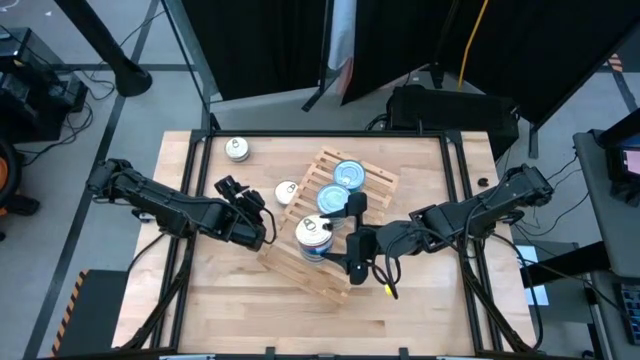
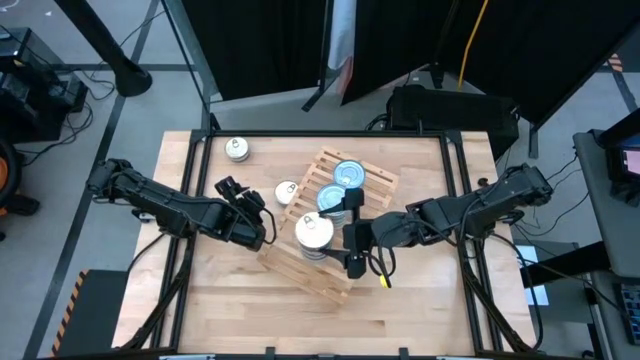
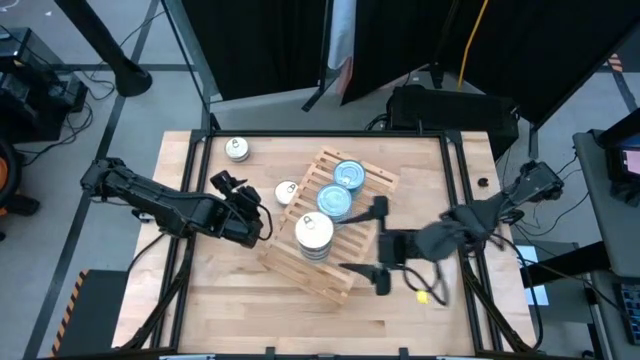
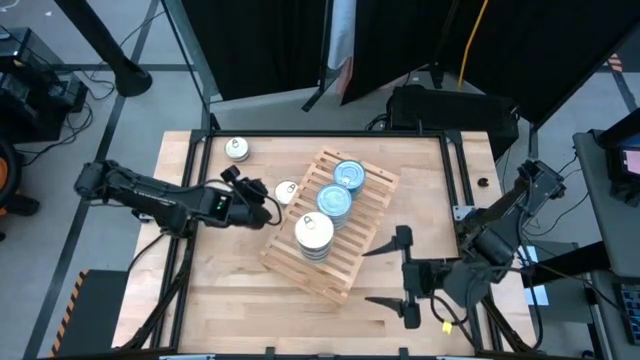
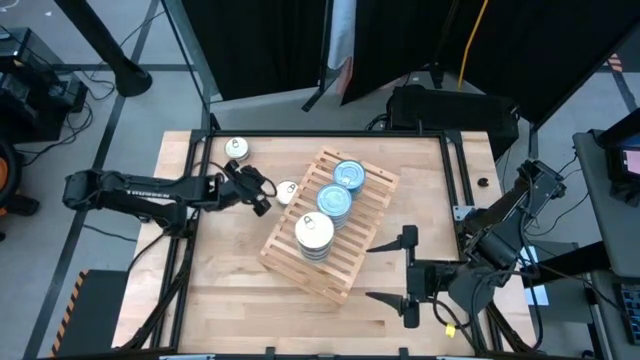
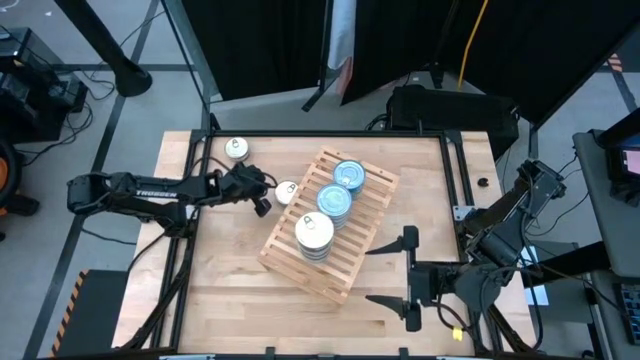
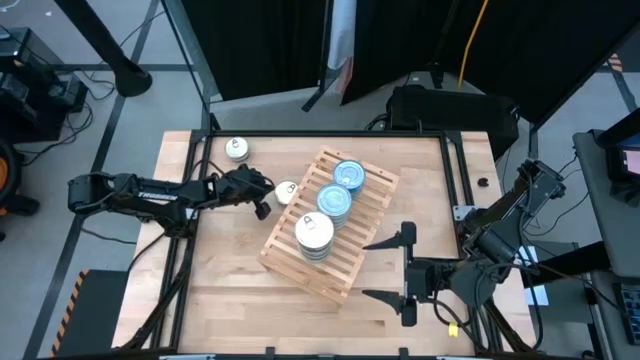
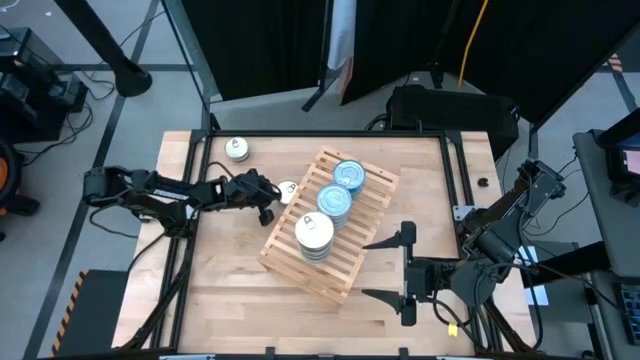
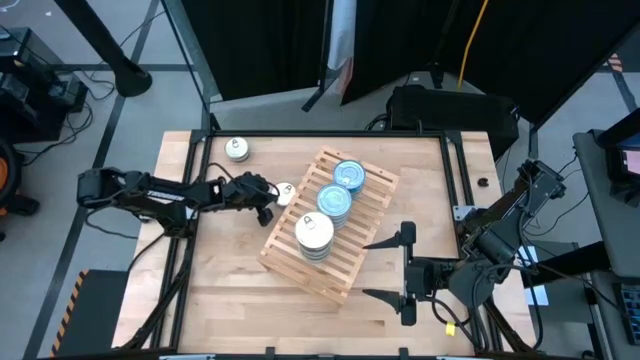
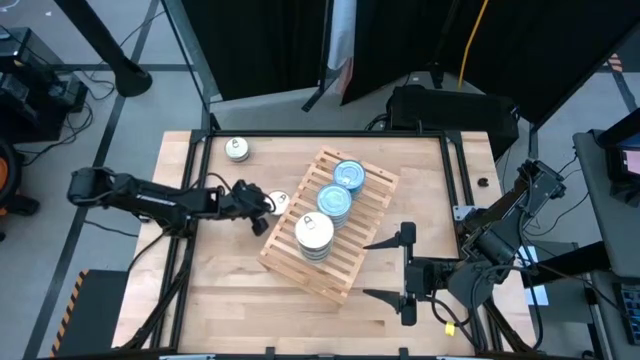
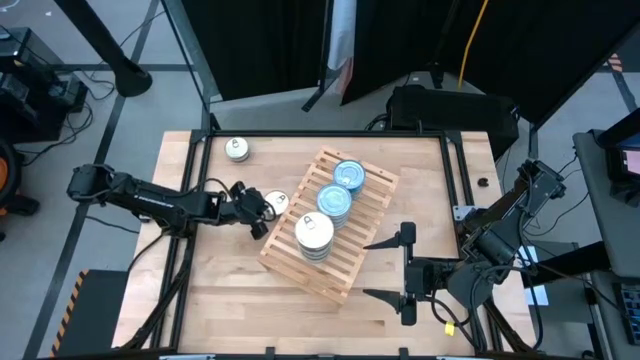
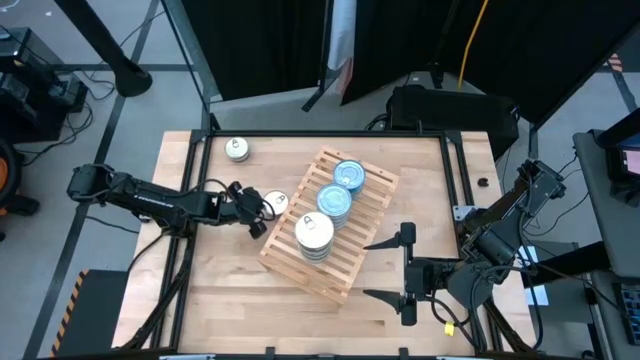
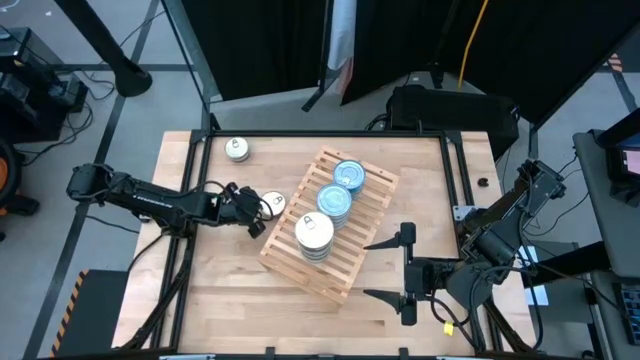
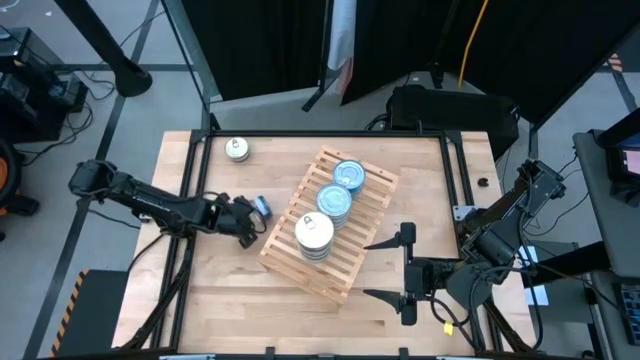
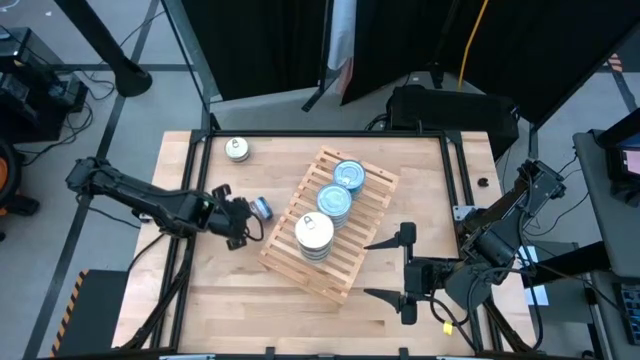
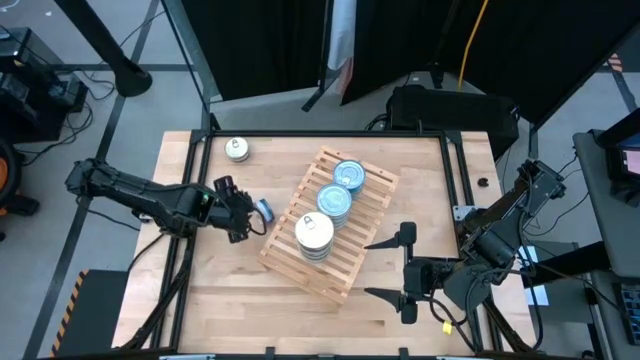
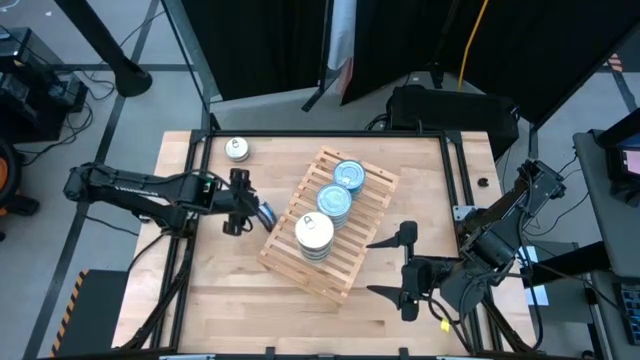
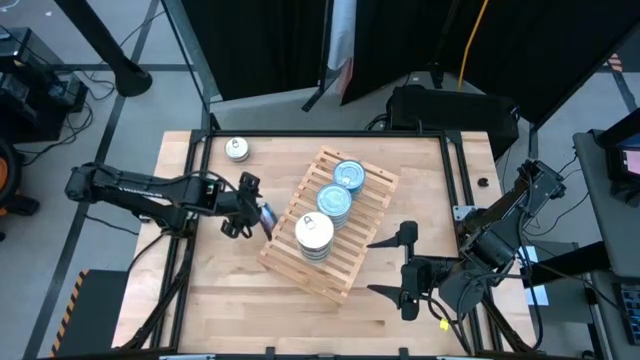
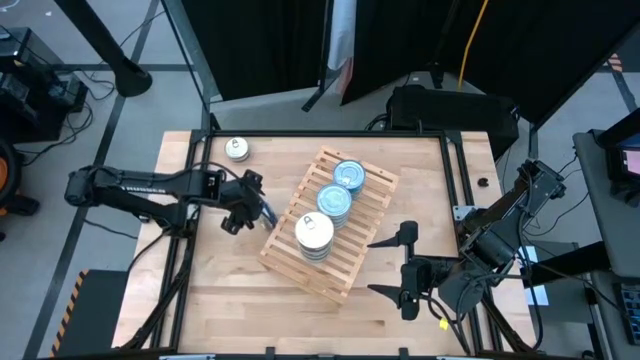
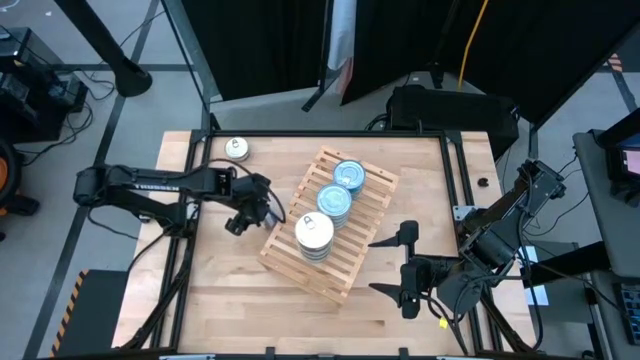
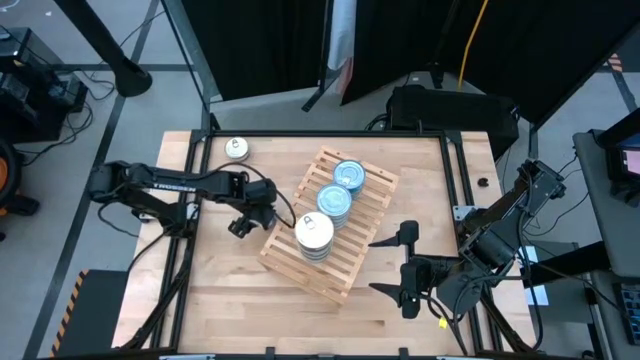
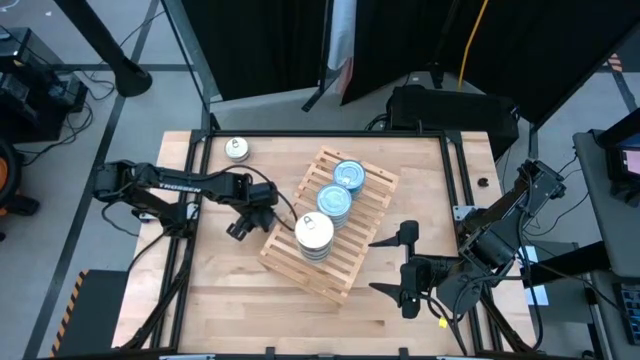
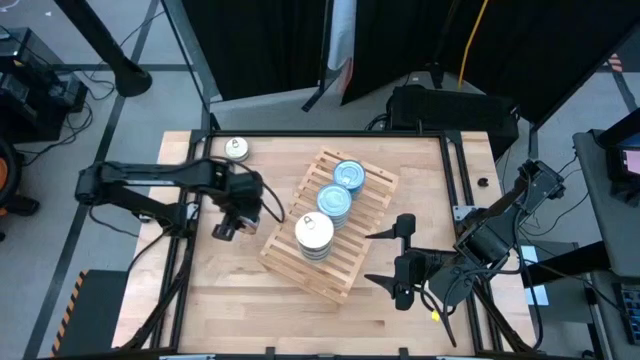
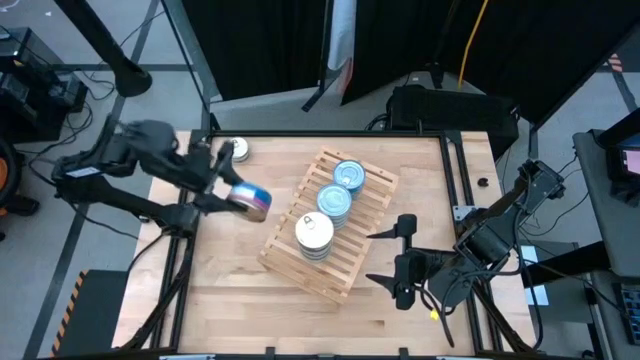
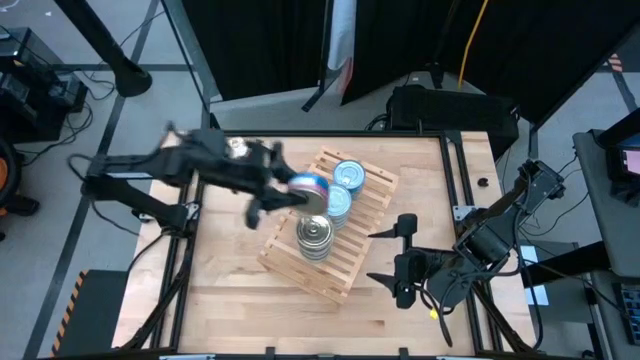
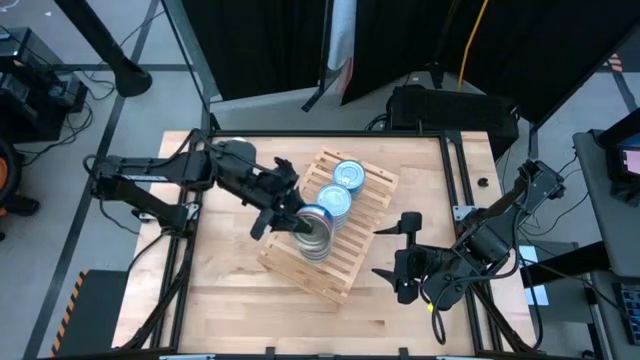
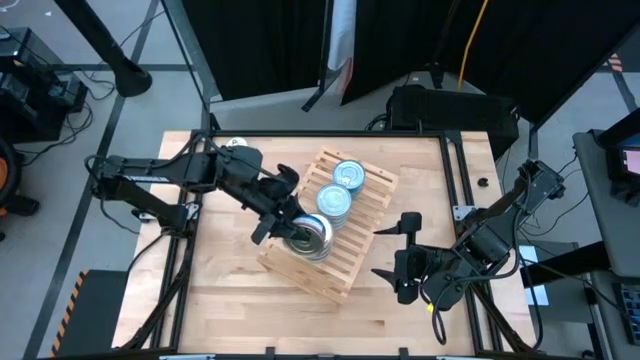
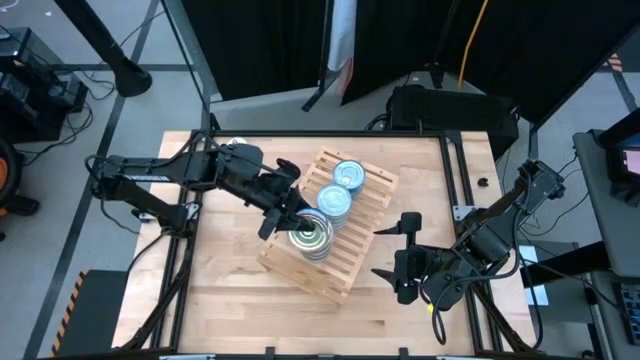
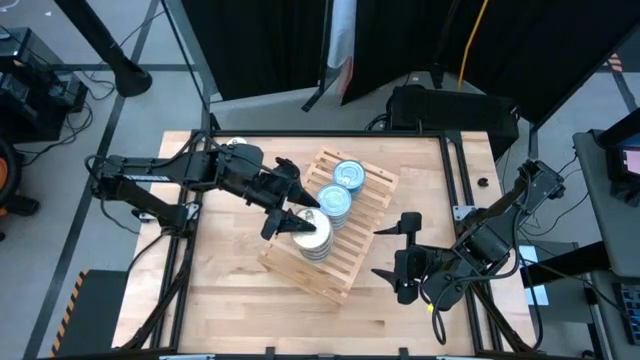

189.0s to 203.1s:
Task: Stack canned seafood by type on shelf
Stack the blue-pink tuna can on top of the other blue-pink tuna can on the shelf

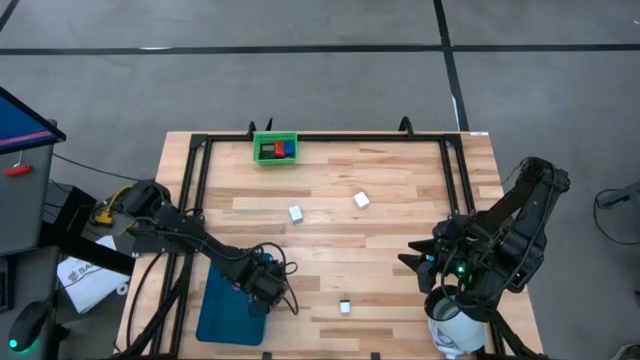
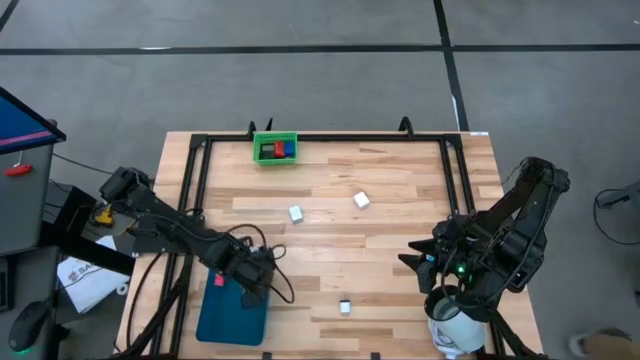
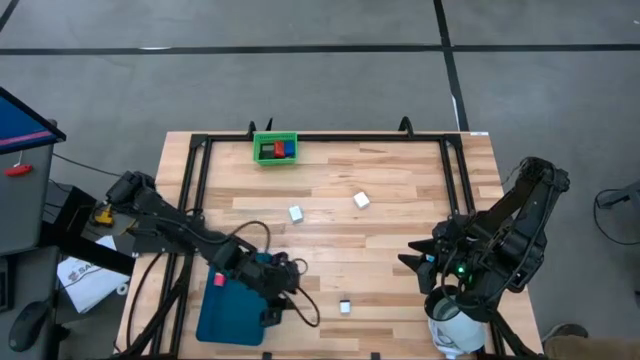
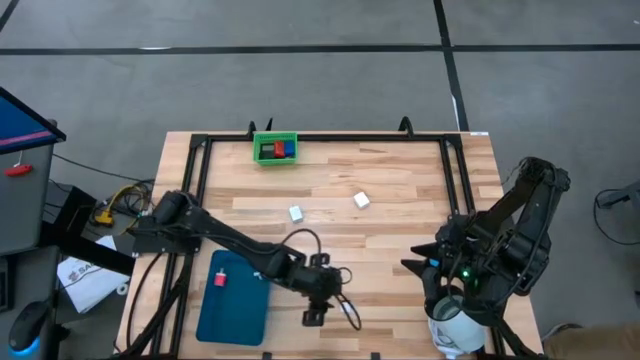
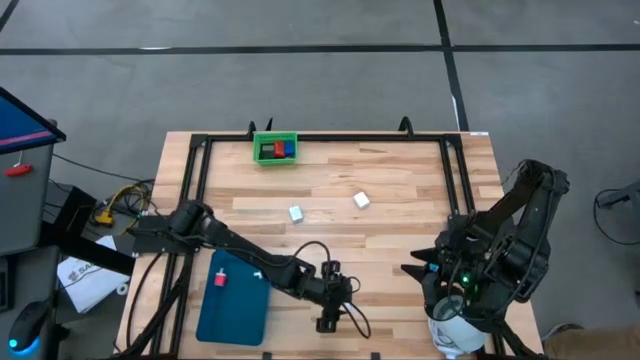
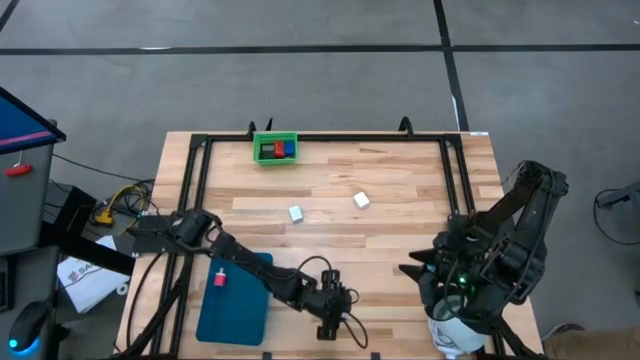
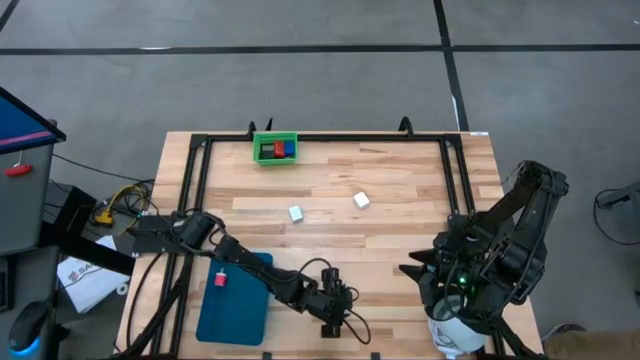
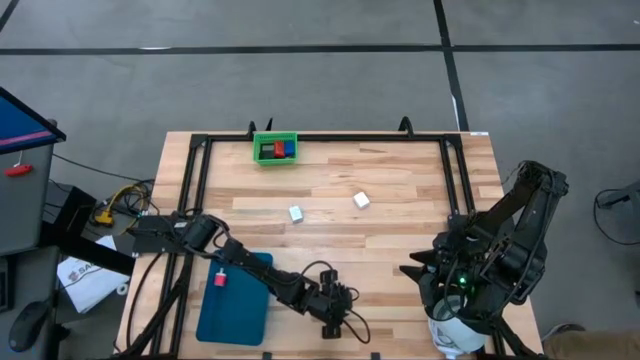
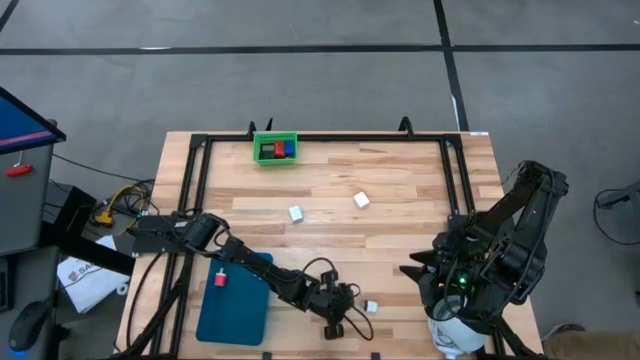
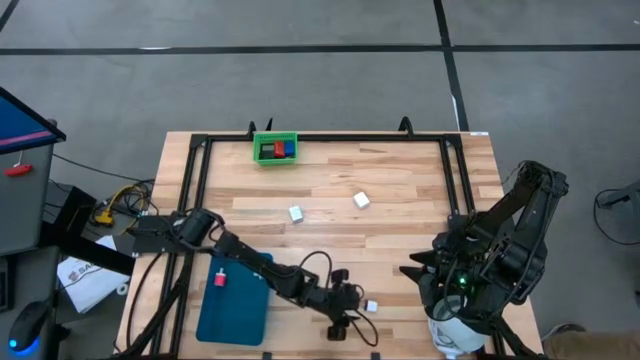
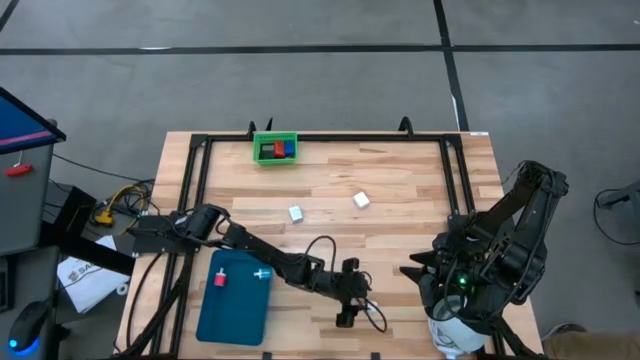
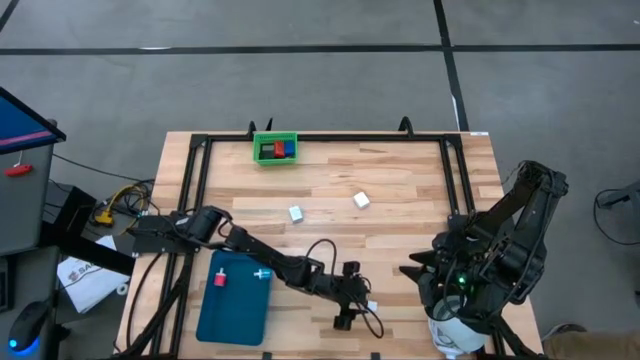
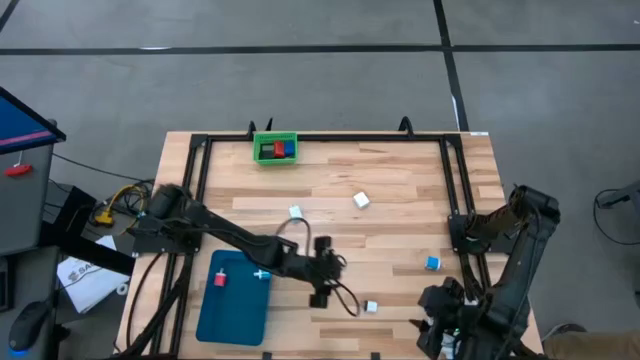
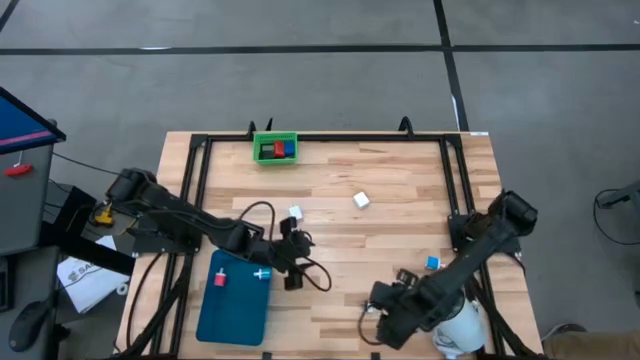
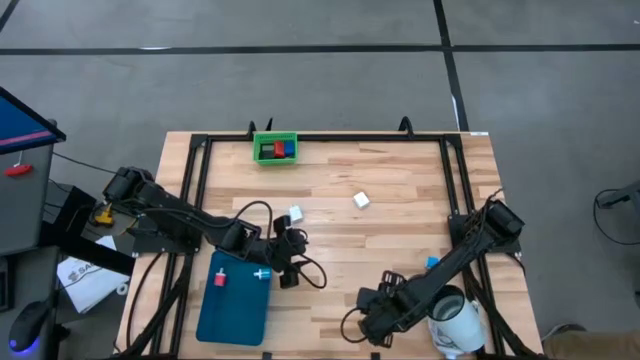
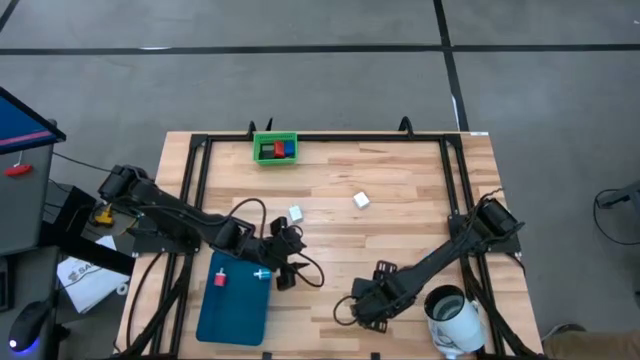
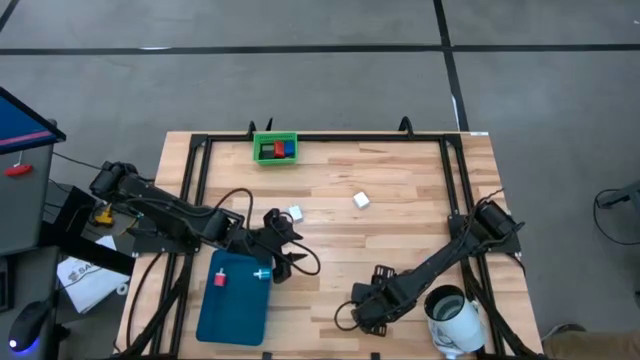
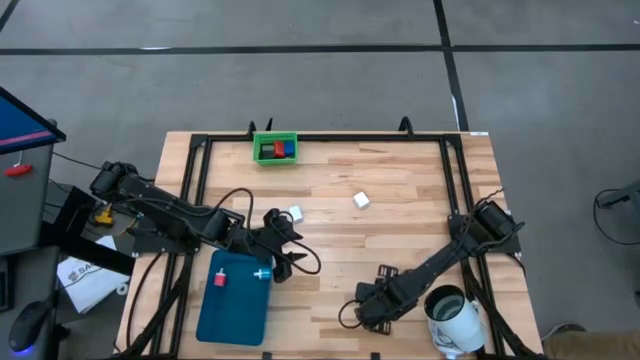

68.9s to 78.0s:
Task: Pick & Place Office items
Put the white and black charger adapter into the blue bin
